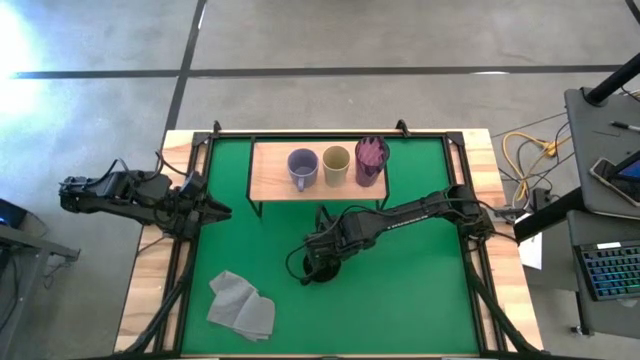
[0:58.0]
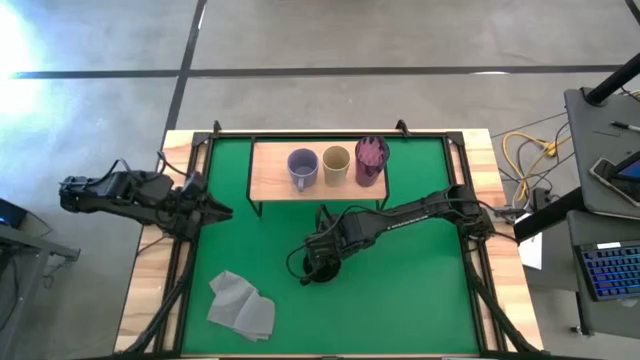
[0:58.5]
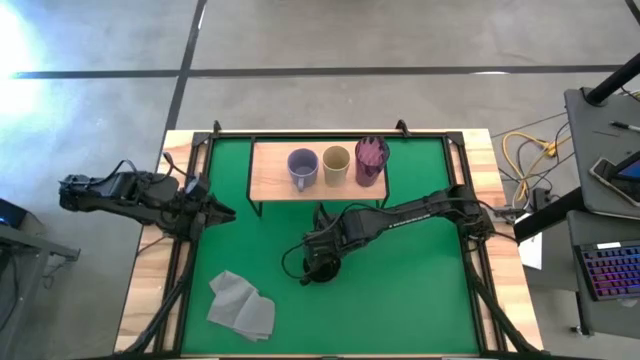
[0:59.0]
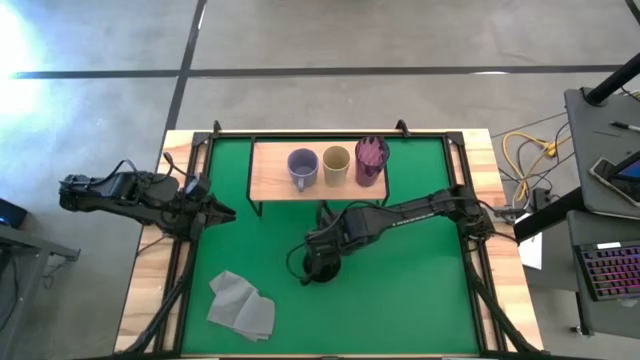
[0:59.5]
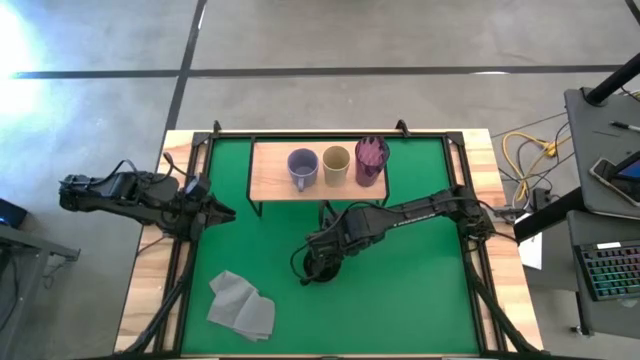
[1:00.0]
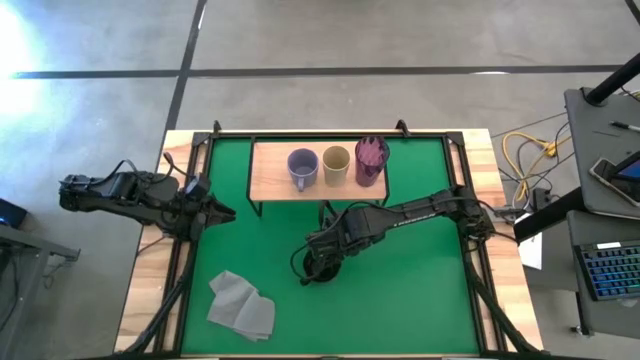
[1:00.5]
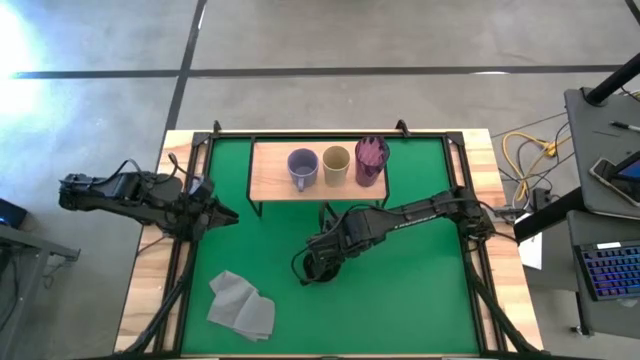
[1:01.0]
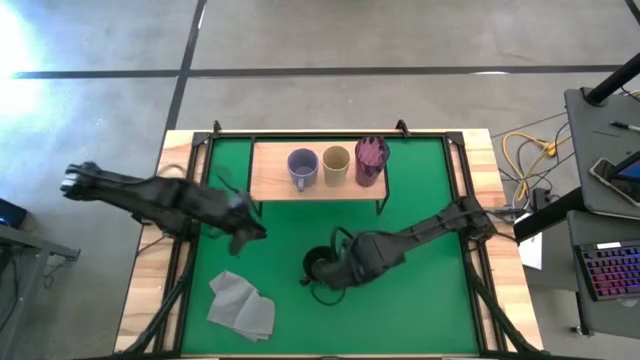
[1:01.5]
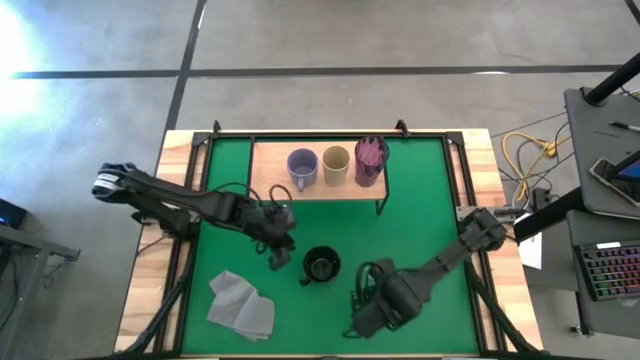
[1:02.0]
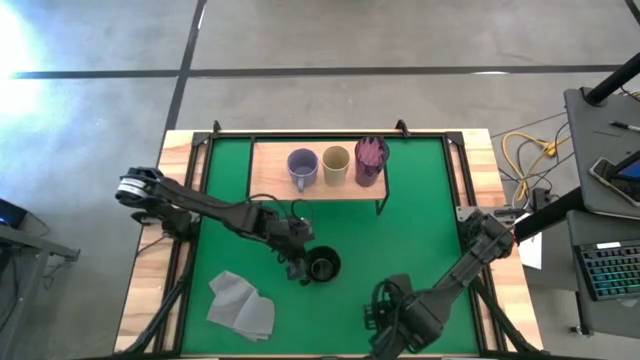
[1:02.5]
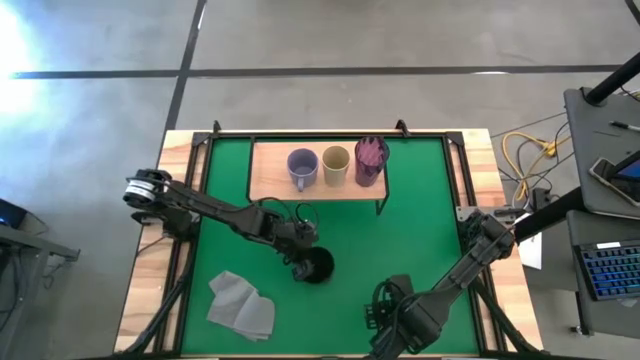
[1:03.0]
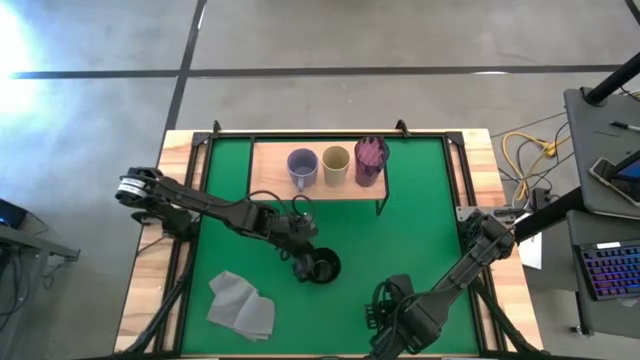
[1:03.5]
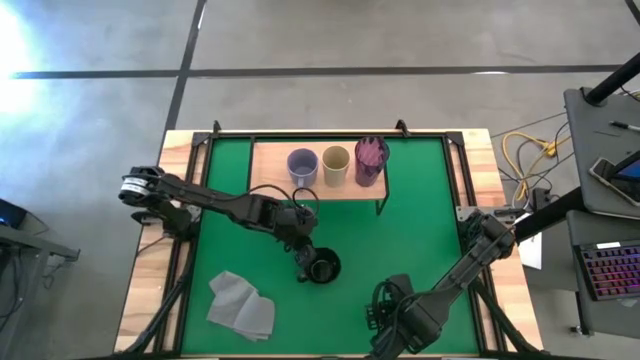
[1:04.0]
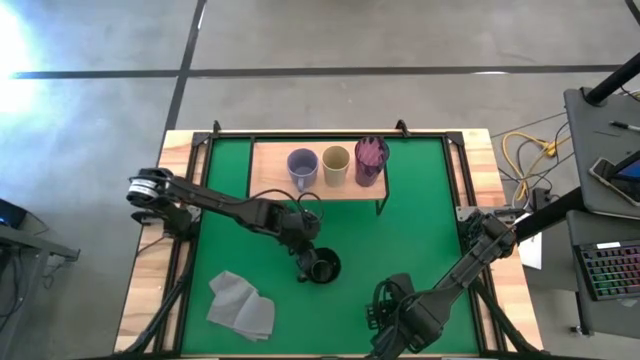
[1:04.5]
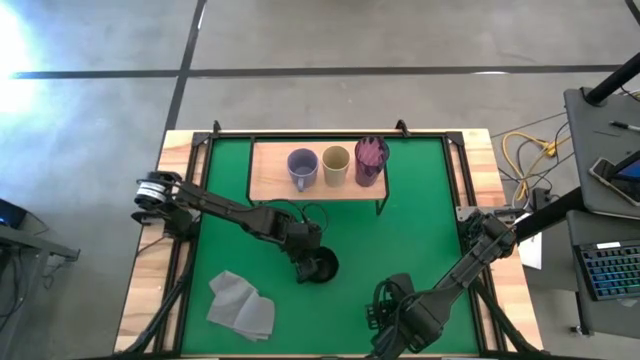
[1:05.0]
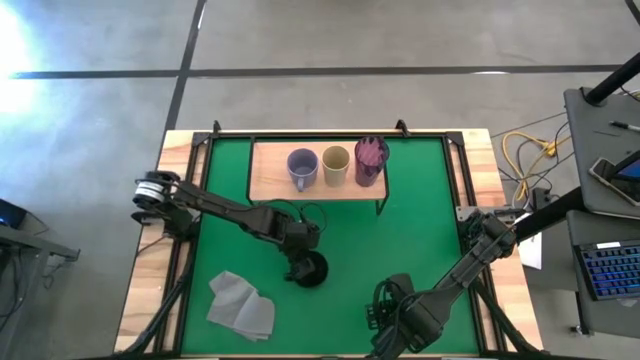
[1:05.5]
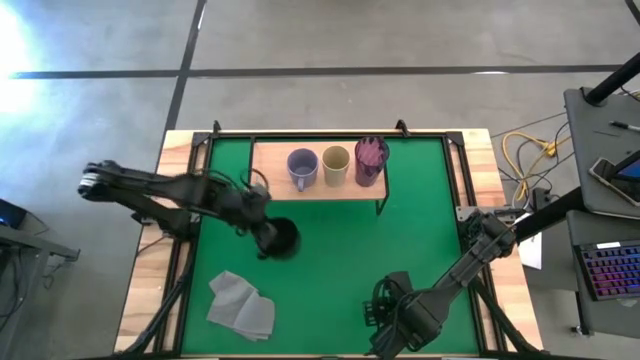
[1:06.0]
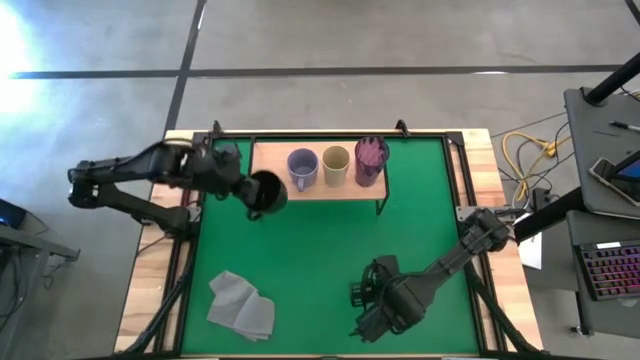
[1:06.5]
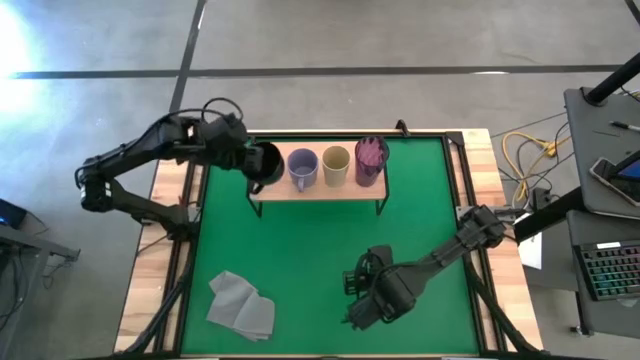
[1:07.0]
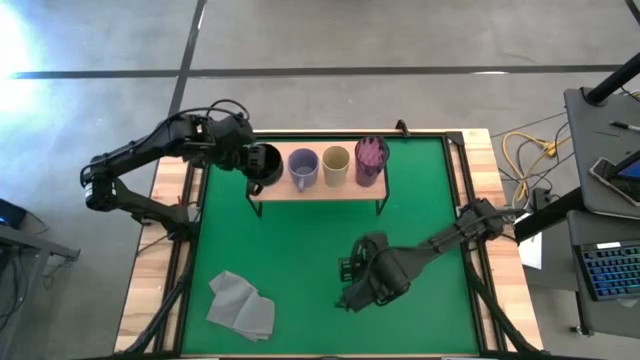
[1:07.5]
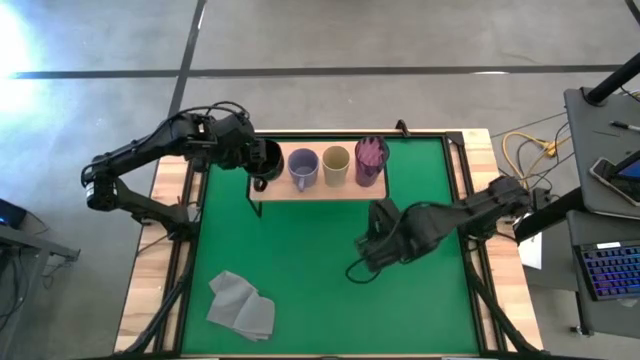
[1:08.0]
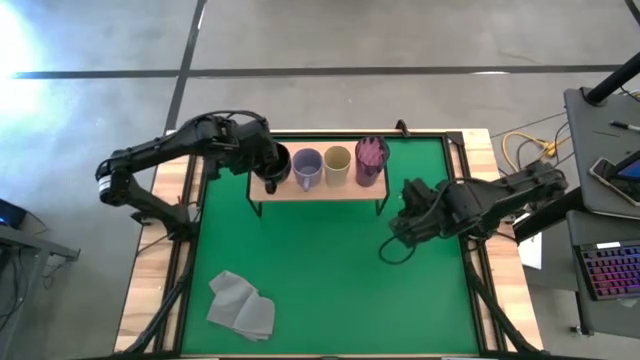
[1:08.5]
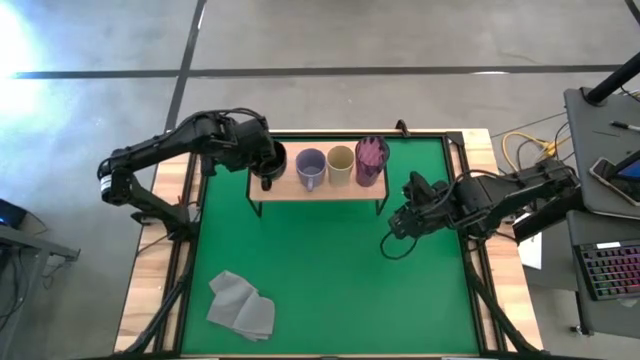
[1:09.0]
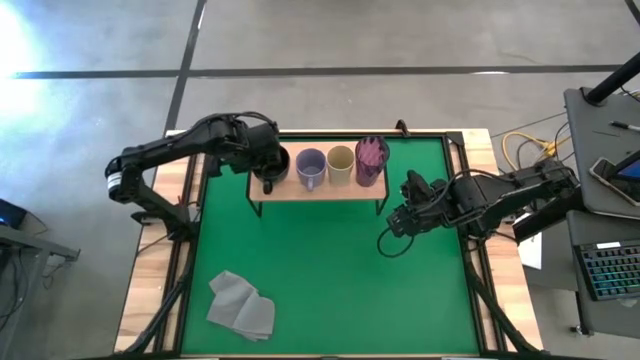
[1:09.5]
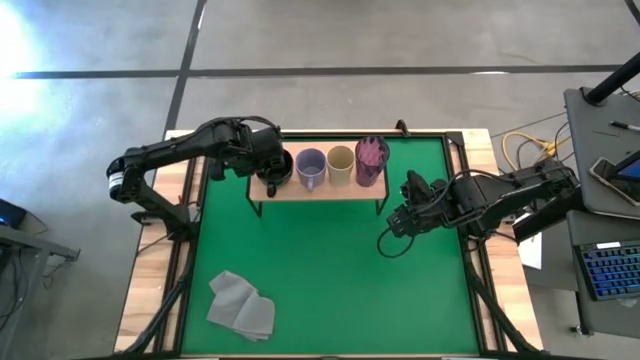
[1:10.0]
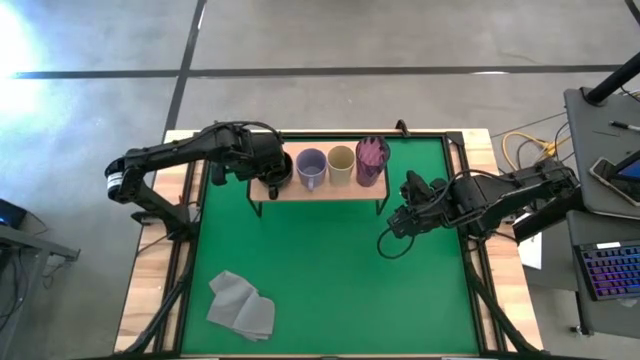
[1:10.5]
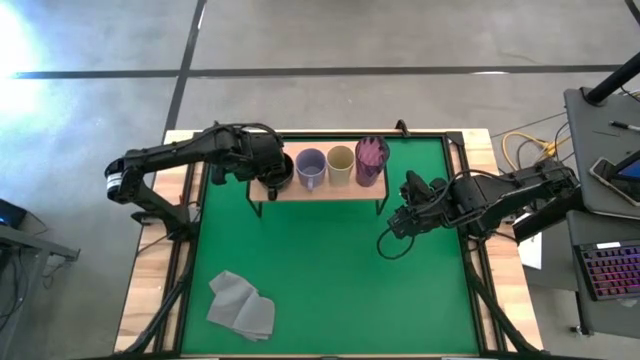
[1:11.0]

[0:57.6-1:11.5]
Task: Stack small to large cups/mugs on shelf
Put the black mug on the shelf

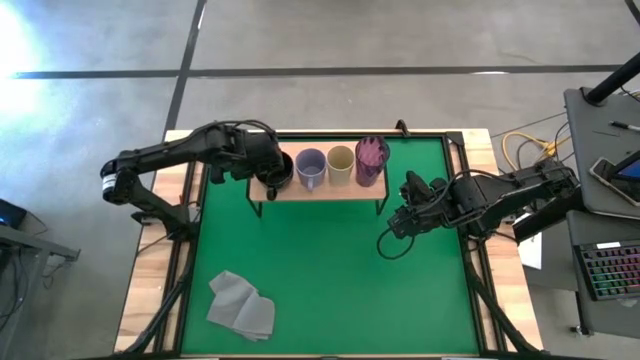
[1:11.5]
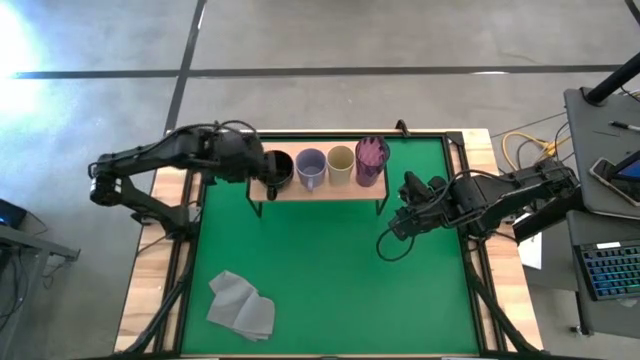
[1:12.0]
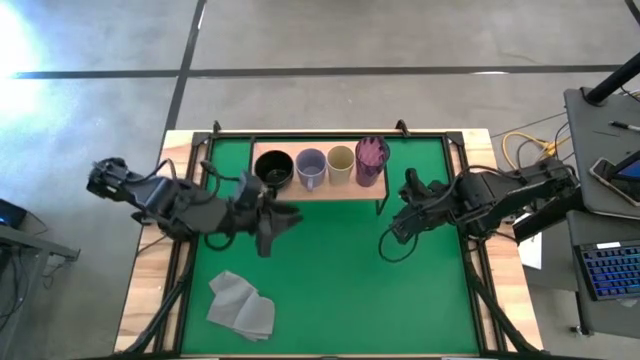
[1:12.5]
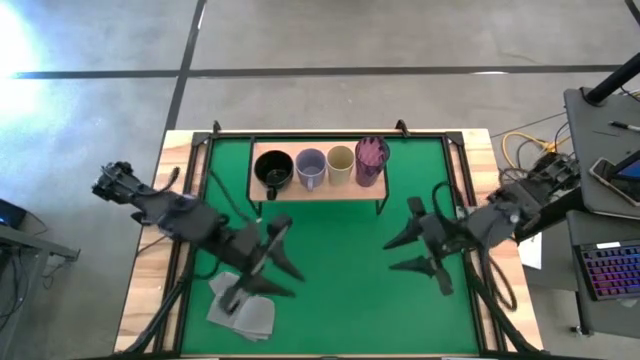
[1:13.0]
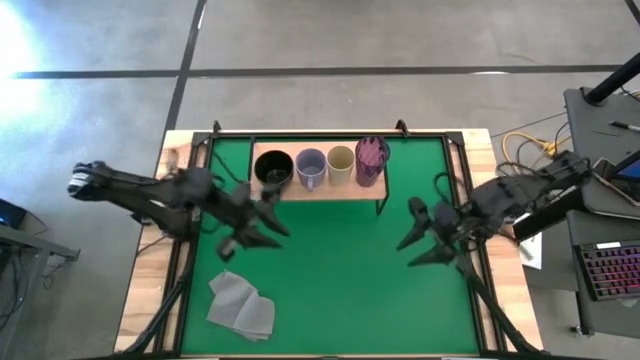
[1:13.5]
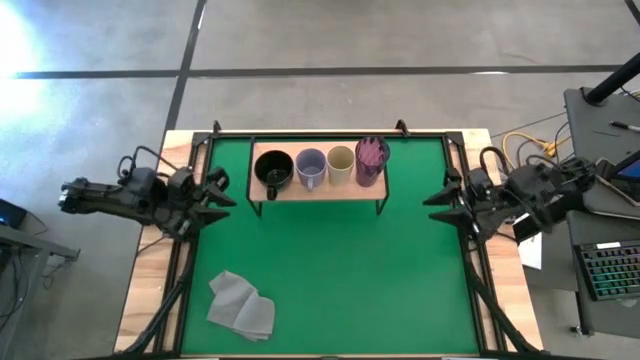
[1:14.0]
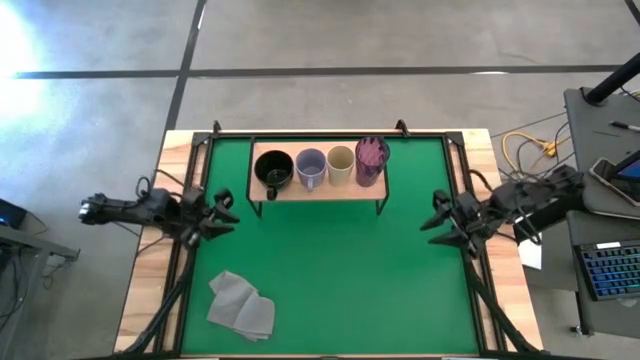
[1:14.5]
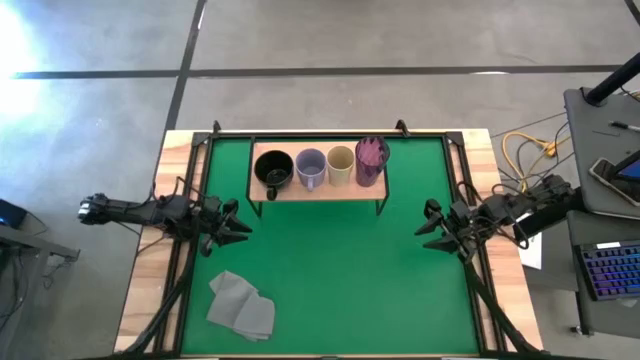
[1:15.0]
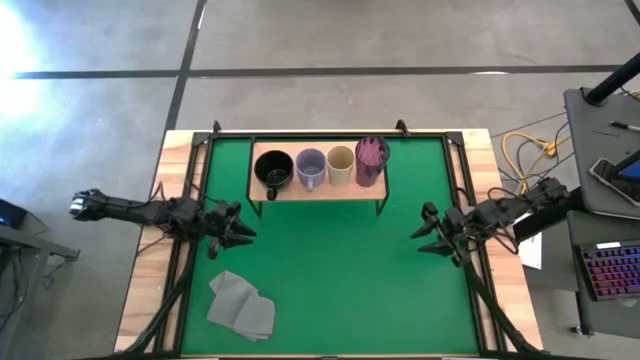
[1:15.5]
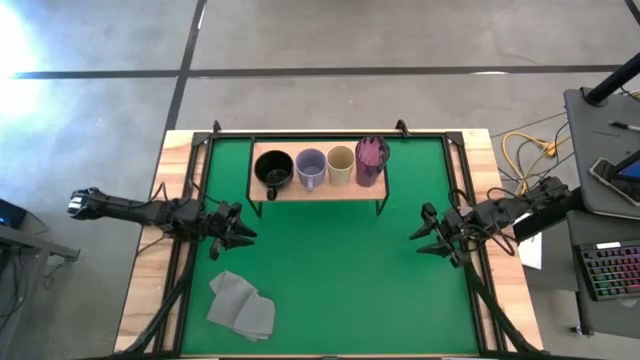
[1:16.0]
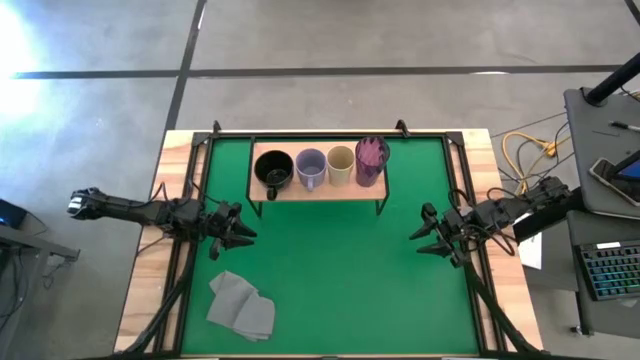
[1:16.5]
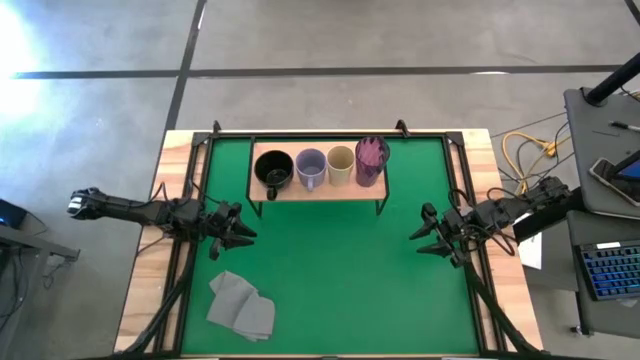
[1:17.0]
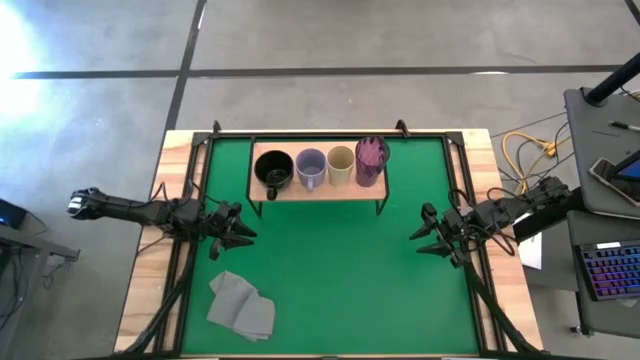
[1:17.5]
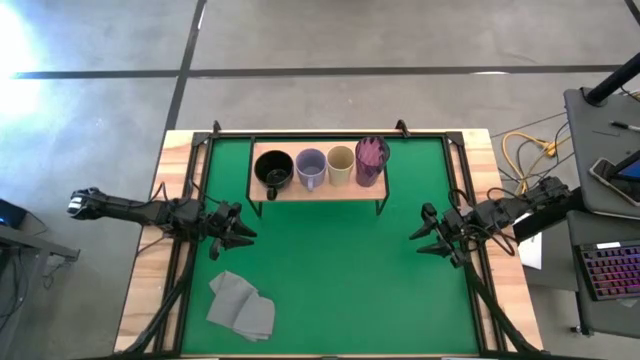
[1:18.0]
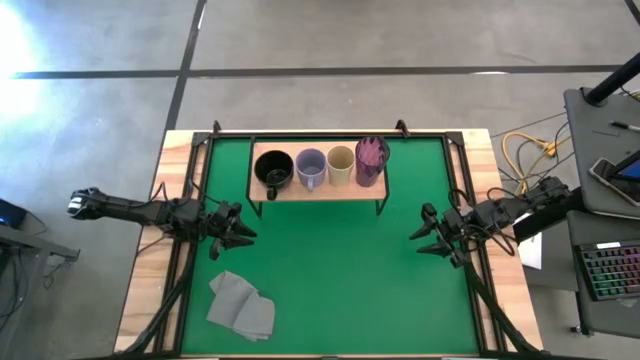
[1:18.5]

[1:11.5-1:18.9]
Return to Home Position

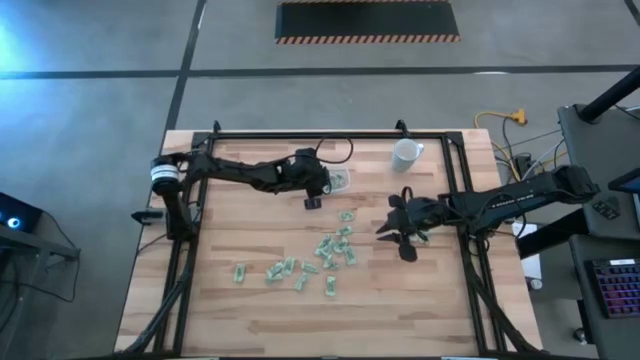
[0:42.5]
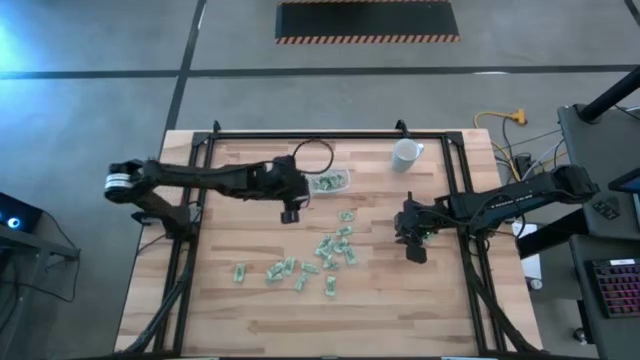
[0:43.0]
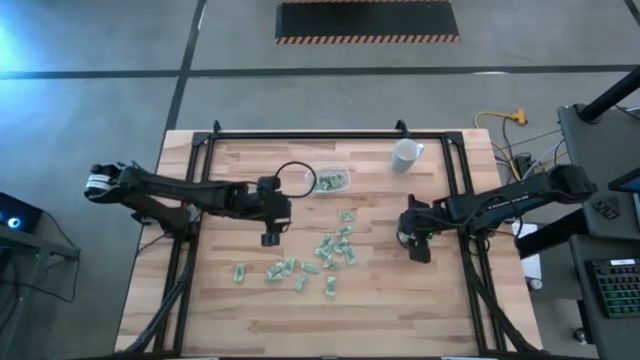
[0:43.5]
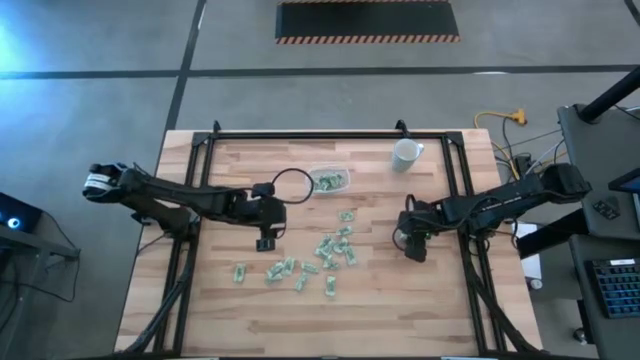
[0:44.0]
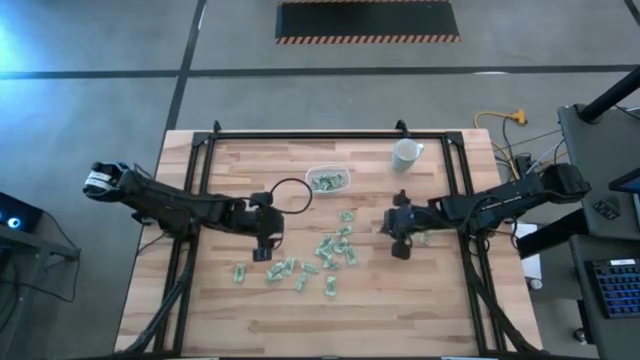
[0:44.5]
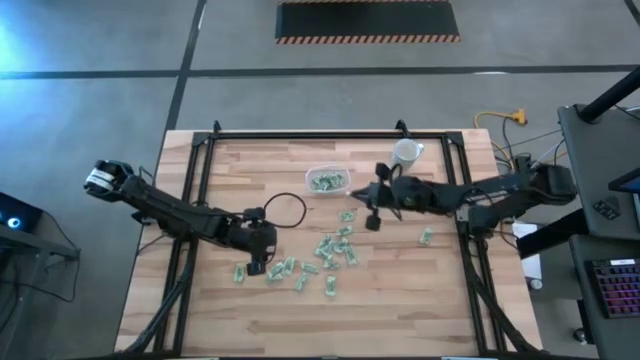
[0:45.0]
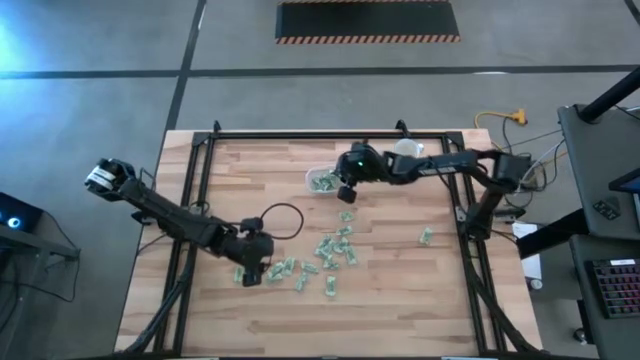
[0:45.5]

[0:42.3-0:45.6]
Task: Pick and place Stevia / Truvia into bins
Put the stevia packet into the transparent container
